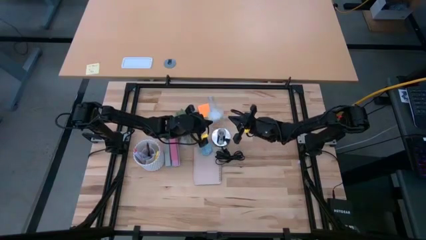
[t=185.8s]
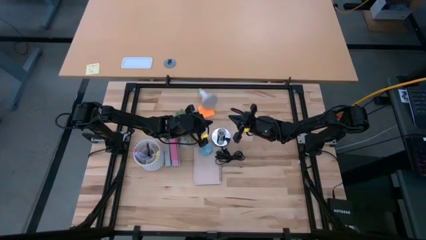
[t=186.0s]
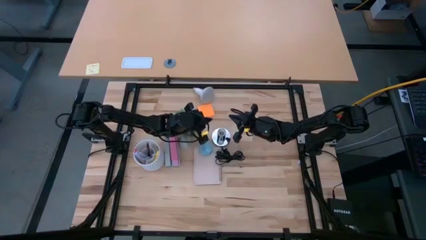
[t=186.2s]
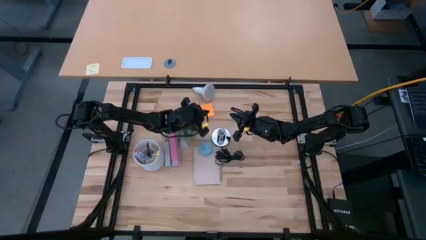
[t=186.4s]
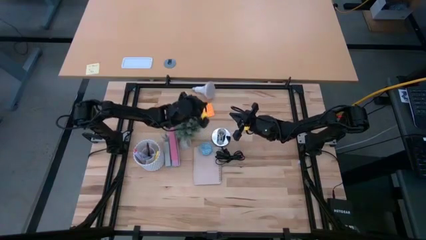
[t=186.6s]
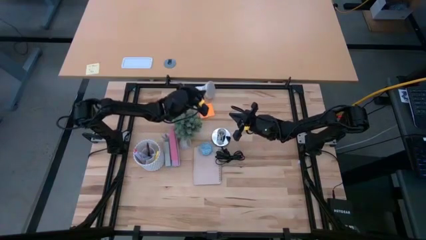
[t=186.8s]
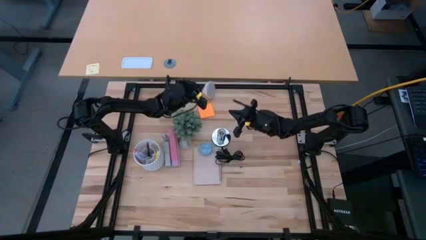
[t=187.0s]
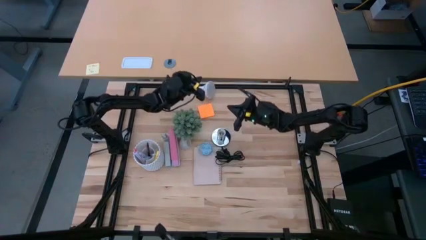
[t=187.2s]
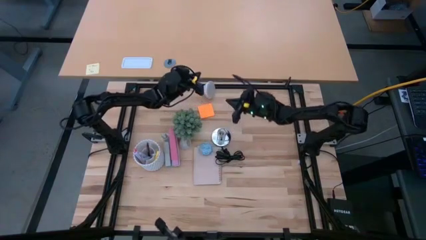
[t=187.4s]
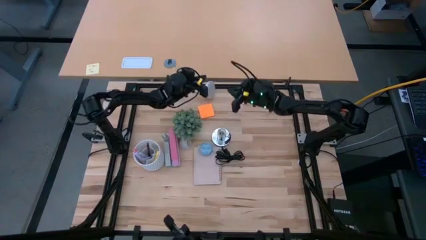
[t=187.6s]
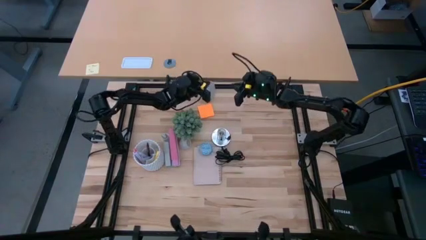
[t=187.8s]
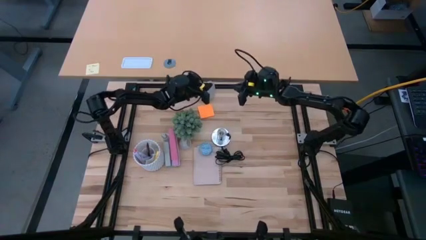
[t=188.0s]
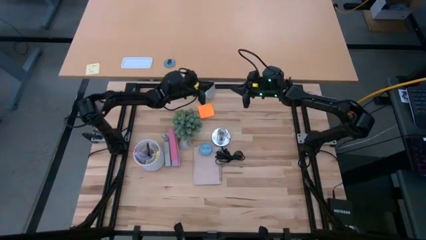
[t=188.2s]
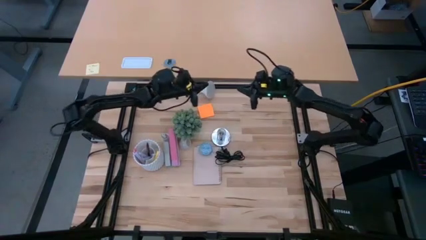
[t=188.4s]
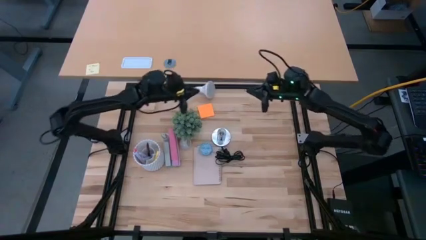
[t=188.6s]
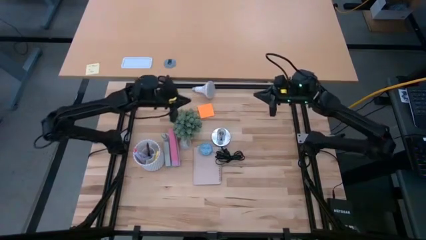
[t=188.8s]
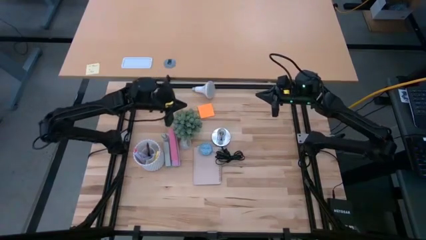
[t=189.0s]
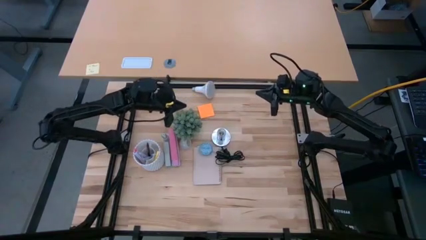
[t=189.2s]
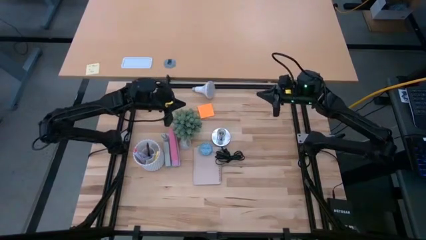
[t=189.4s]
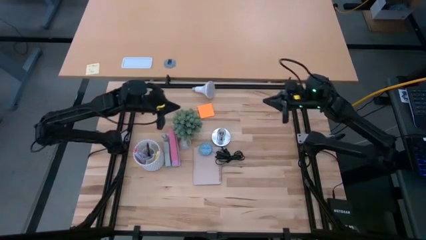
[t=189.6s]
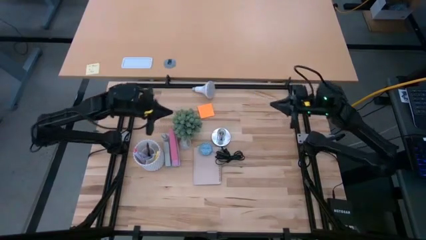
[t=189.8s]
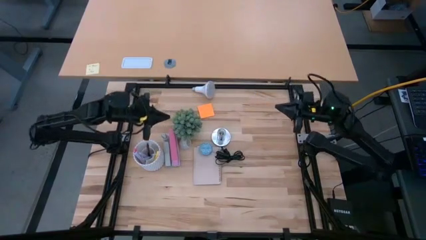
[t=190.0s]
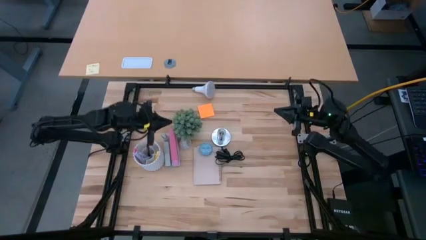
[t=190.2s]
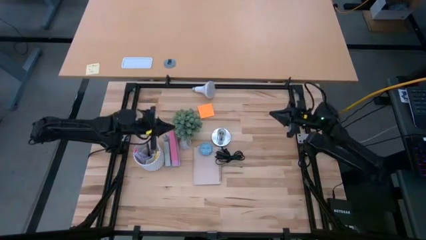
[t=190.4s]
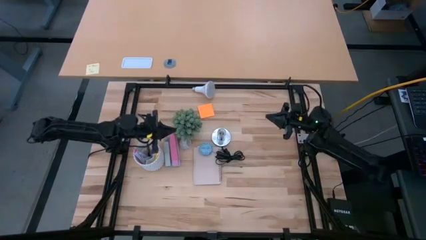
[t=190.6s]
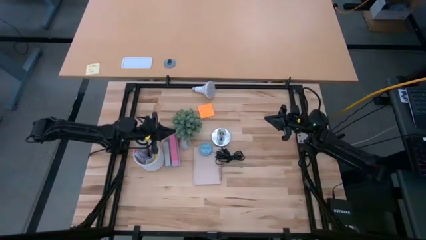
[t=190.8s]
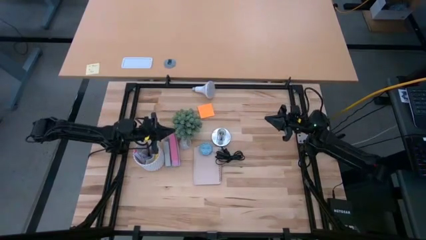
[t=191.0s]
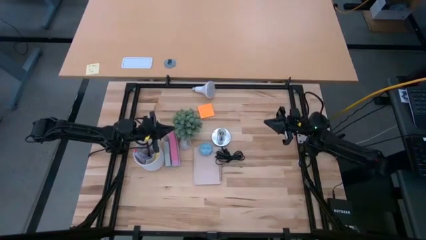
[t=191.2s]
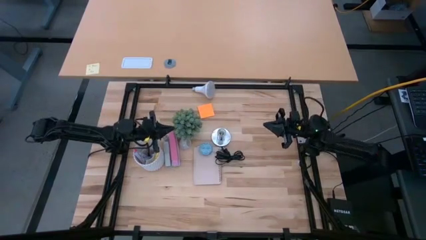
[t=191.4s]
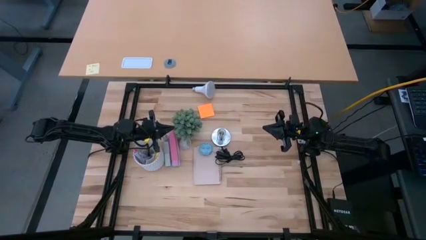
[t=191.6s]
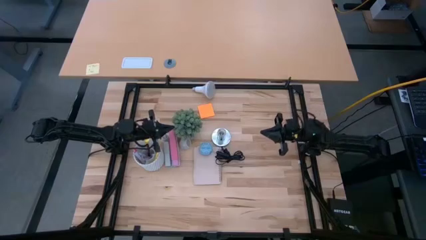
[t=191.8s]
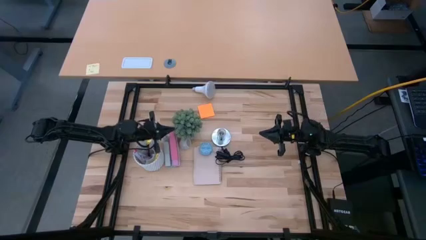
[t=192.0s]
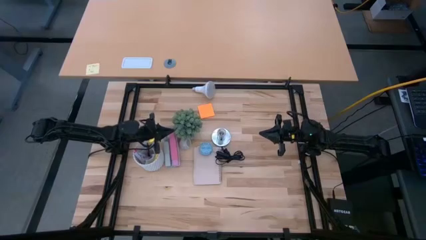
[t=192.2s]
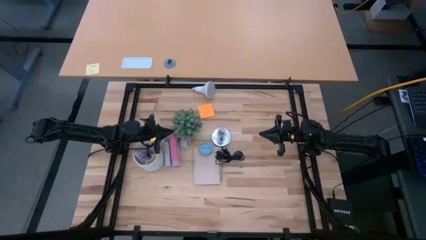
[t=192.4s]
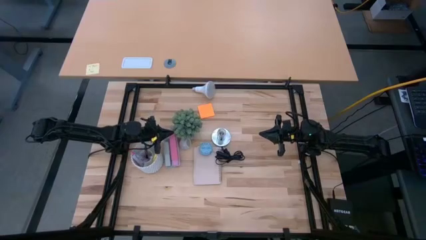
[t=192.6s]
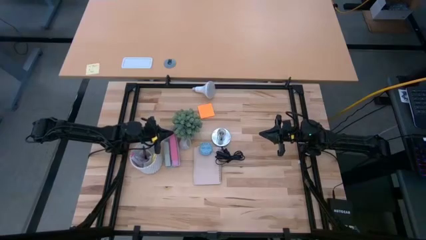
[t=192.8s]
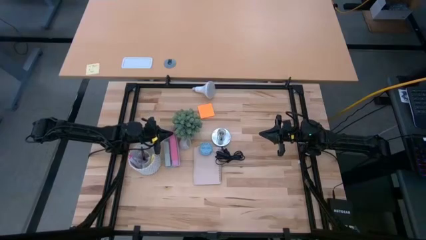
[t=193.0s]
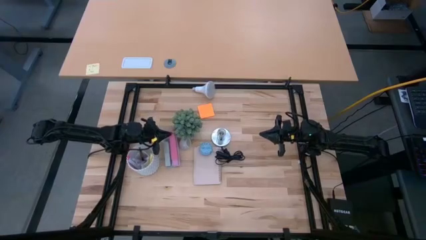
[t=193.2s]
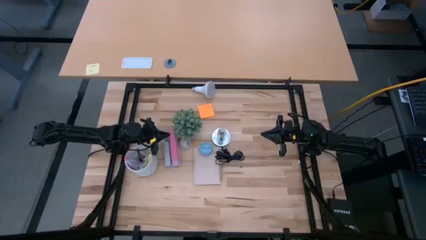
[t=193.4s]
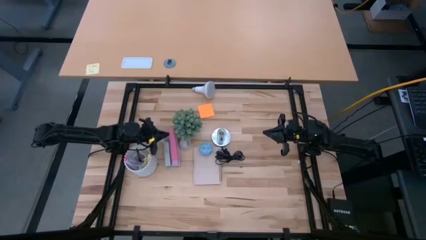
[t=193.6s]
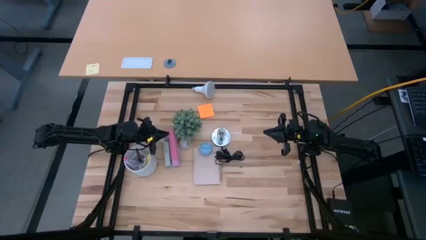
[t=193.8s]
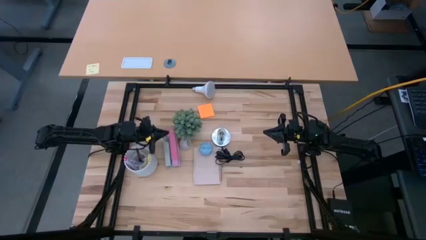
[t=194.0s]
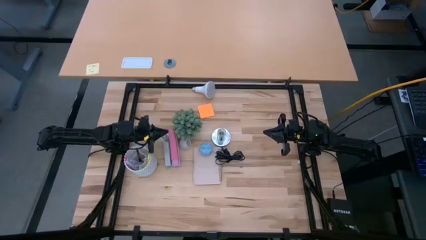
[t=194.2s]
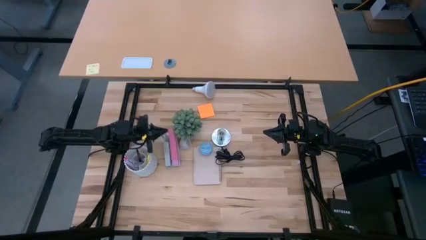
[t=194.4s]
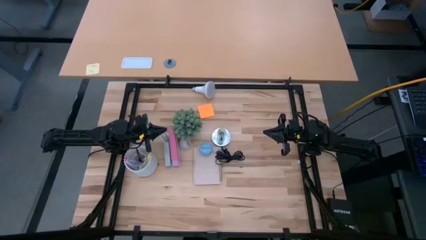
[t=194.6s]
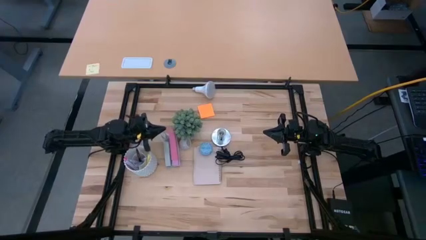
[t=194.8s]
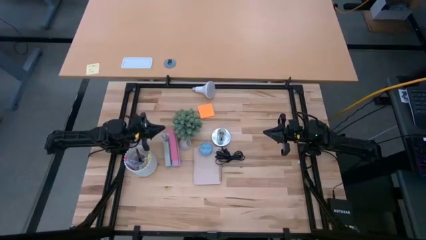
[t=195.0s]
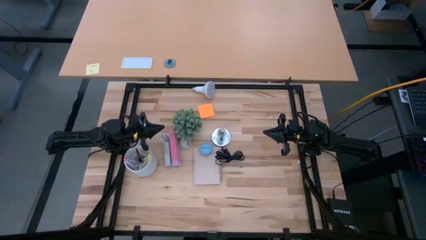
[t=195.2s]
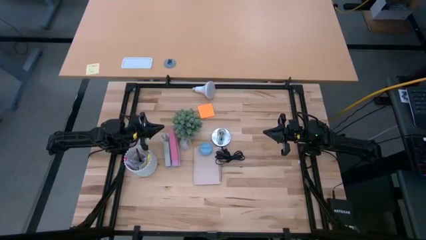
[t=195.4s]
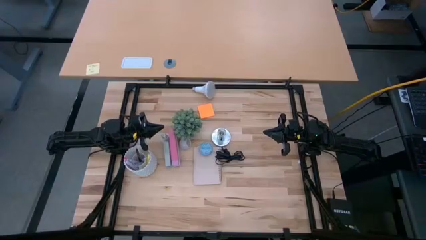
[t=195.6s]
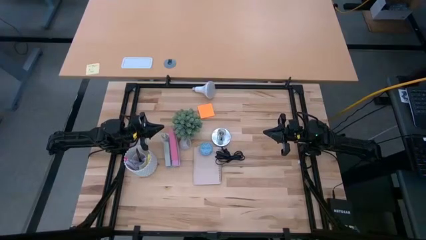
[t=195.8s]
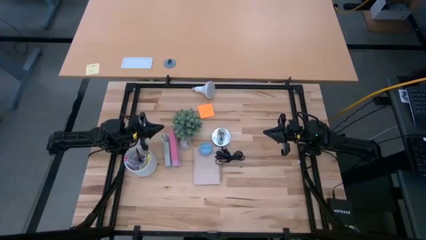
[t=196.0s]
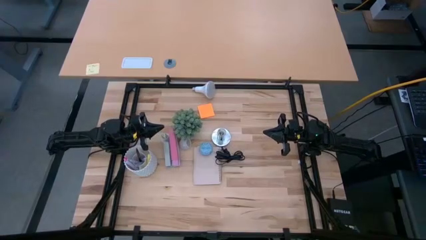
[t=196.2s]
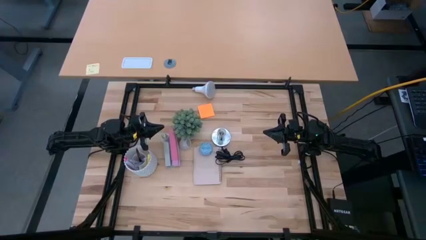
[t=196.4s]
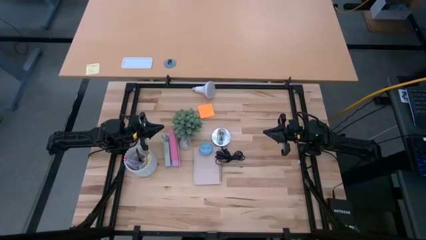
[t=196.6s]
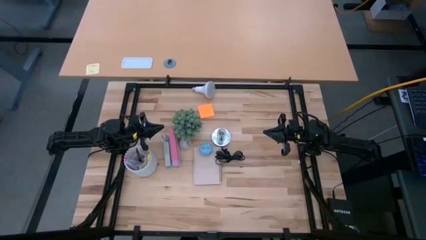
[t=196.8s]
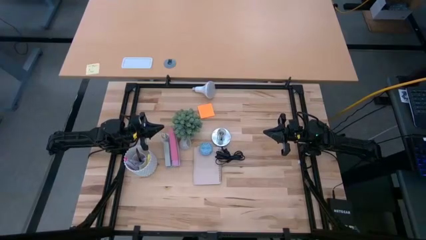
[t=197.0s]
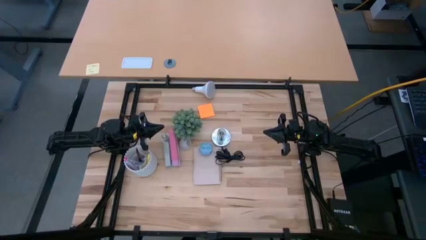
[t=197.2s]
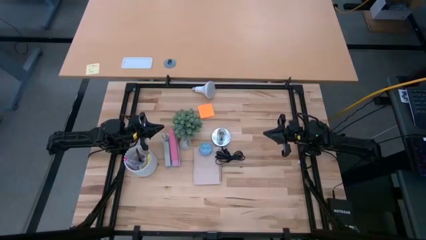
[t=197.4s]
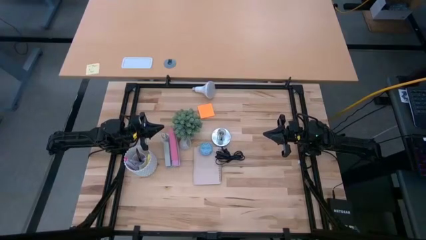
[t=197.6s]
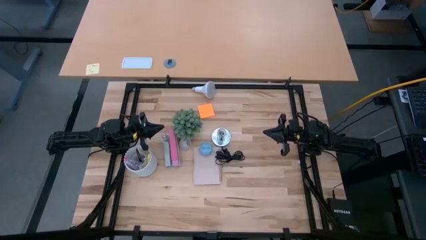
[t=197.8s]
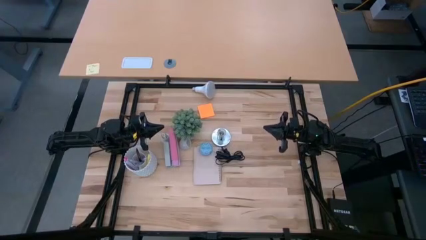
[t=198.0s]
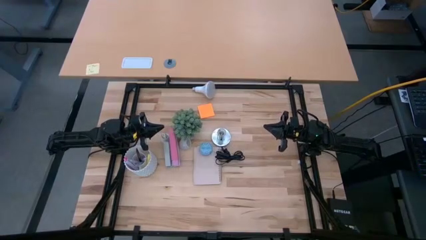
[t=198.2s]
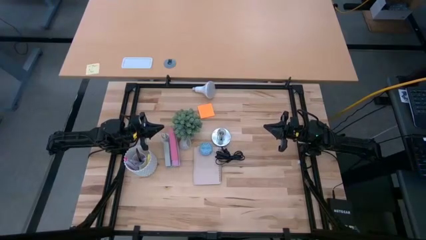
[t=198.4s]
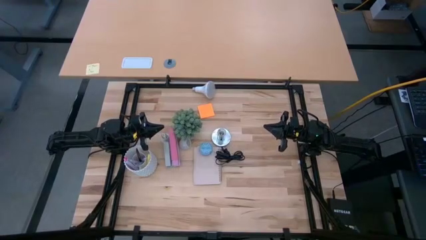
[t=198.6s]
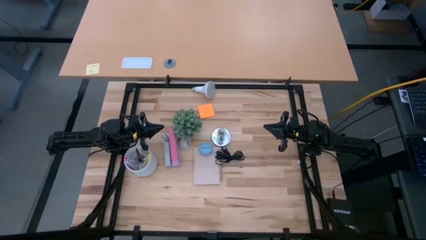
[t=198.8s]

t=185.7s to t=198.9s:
Task: Screw lightbulb
Return to Home Position
